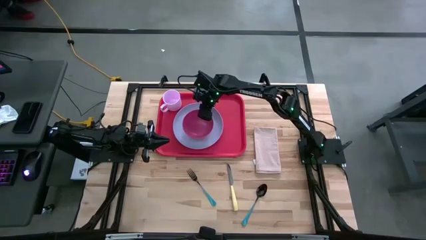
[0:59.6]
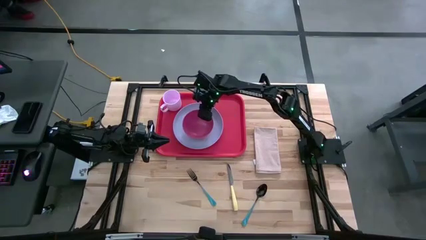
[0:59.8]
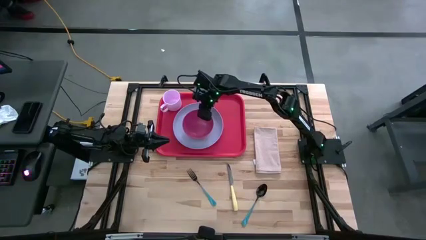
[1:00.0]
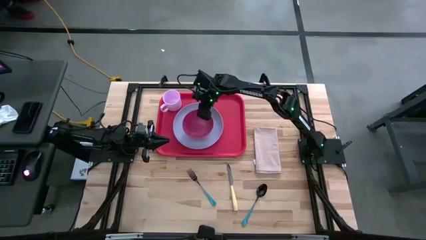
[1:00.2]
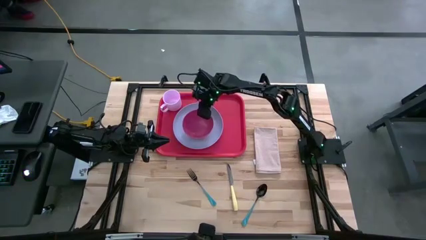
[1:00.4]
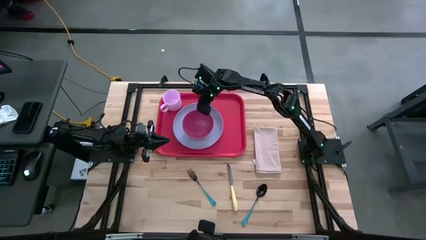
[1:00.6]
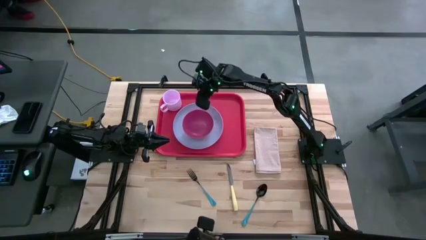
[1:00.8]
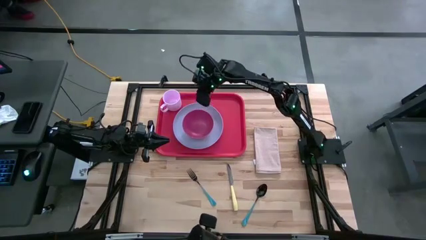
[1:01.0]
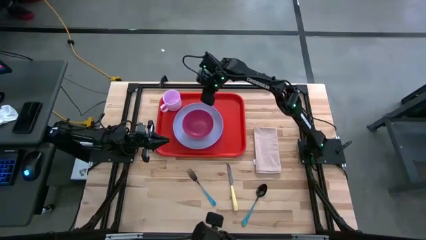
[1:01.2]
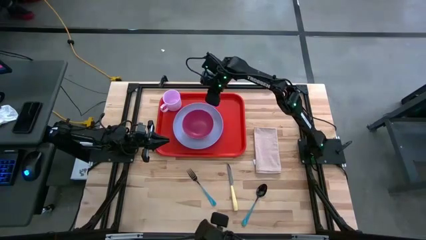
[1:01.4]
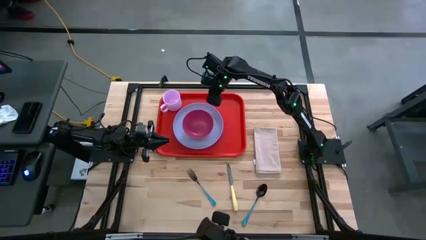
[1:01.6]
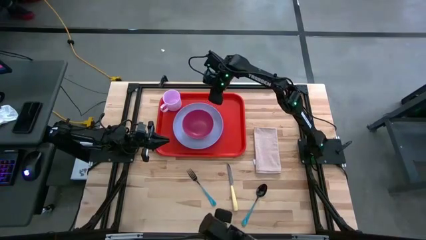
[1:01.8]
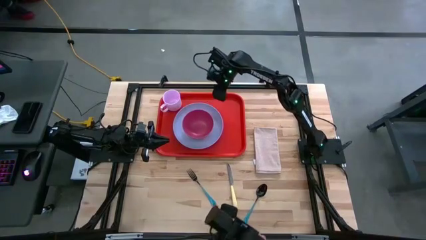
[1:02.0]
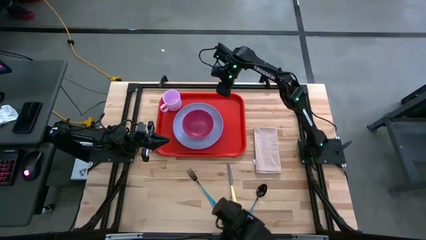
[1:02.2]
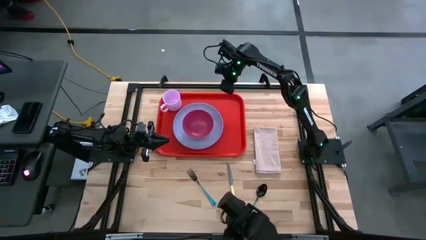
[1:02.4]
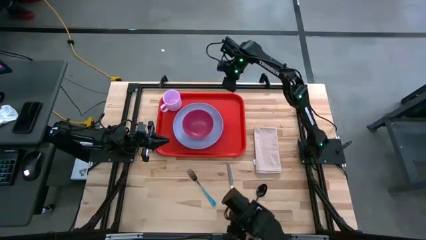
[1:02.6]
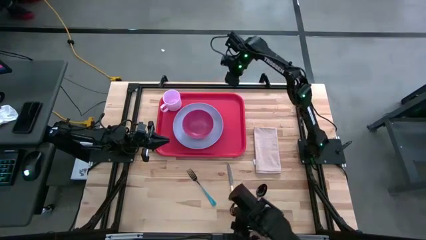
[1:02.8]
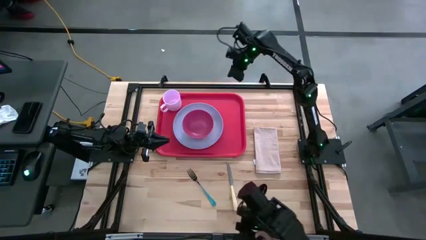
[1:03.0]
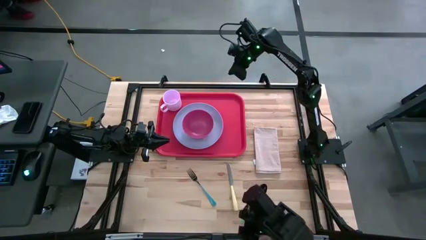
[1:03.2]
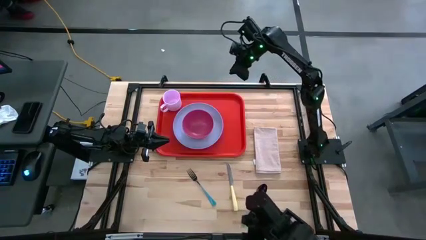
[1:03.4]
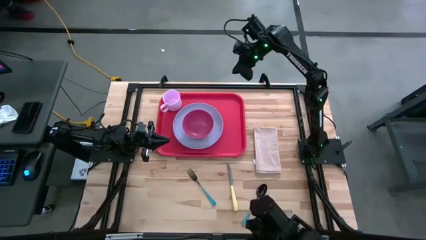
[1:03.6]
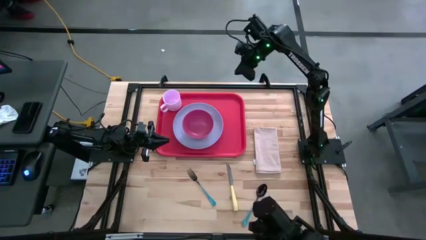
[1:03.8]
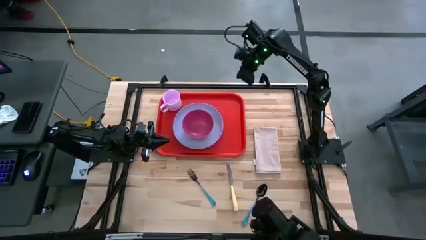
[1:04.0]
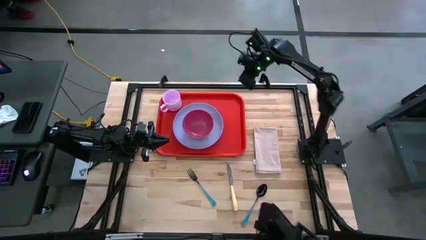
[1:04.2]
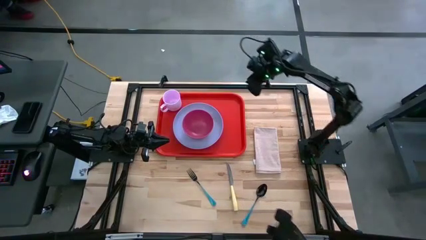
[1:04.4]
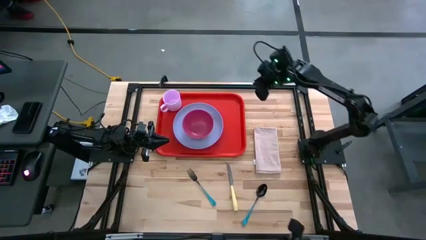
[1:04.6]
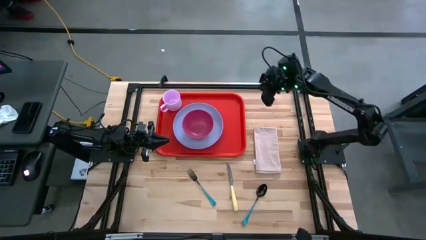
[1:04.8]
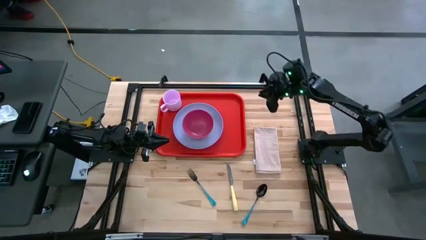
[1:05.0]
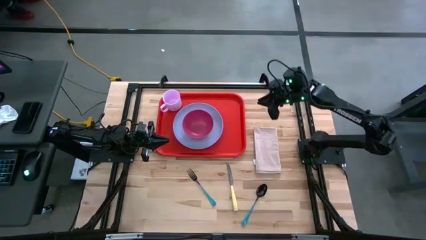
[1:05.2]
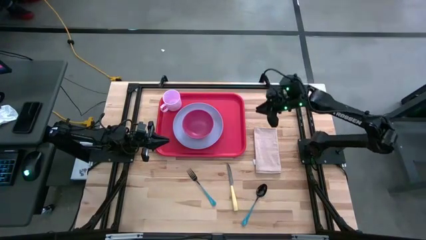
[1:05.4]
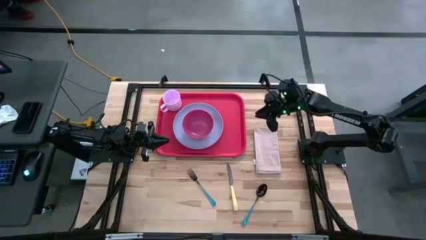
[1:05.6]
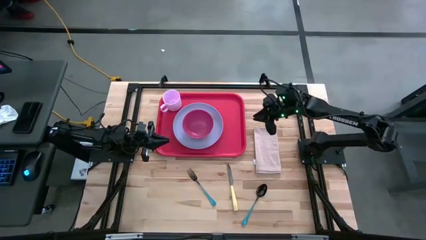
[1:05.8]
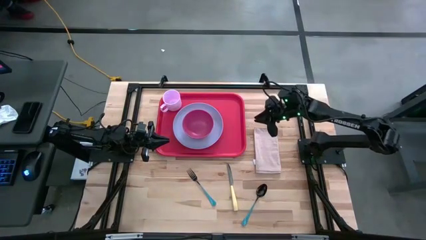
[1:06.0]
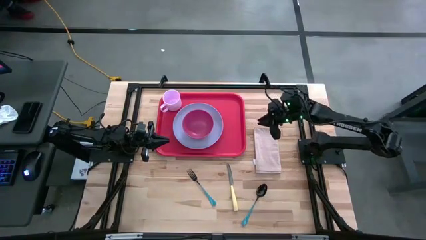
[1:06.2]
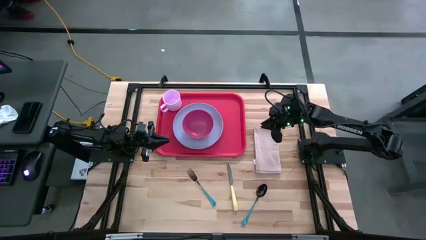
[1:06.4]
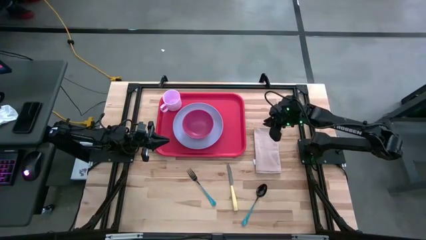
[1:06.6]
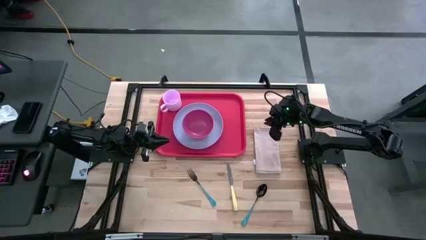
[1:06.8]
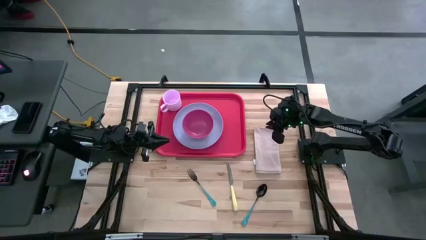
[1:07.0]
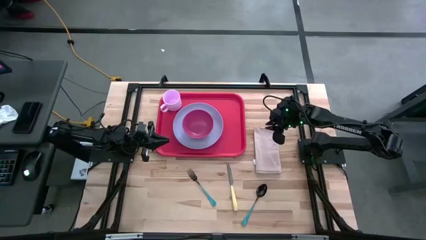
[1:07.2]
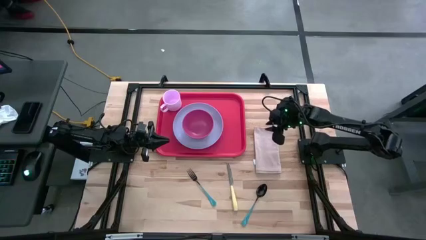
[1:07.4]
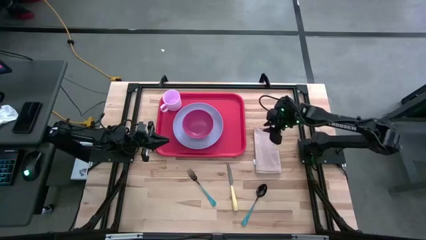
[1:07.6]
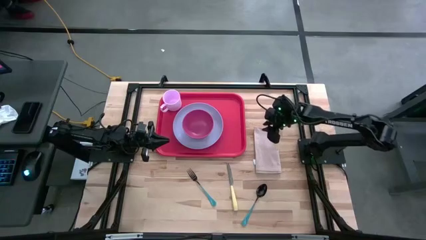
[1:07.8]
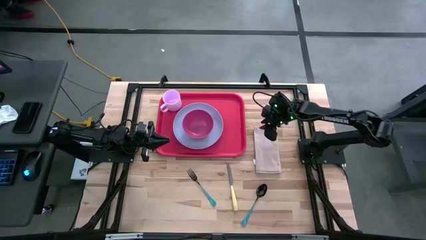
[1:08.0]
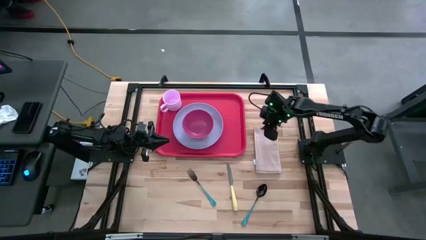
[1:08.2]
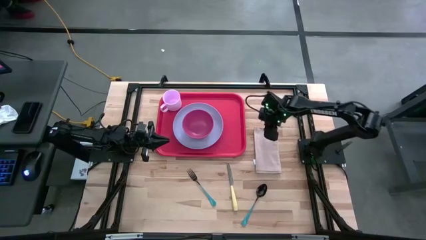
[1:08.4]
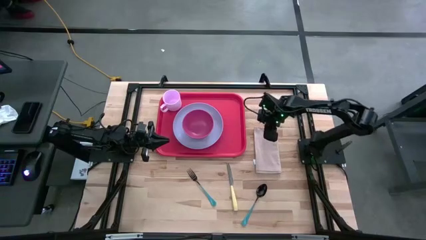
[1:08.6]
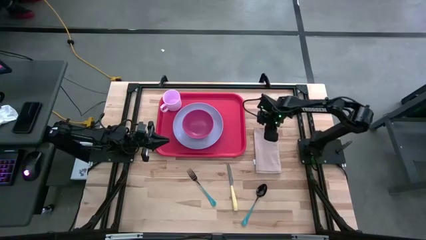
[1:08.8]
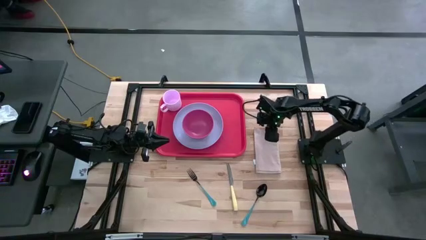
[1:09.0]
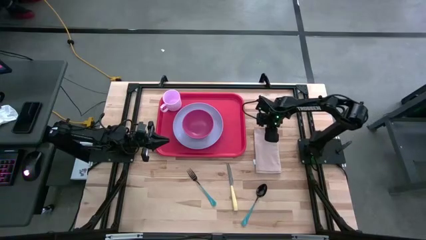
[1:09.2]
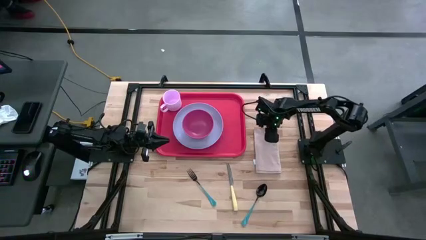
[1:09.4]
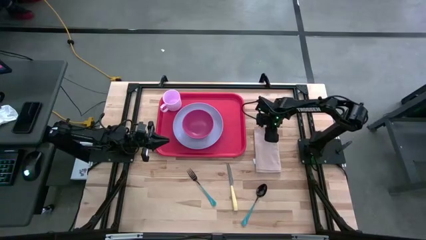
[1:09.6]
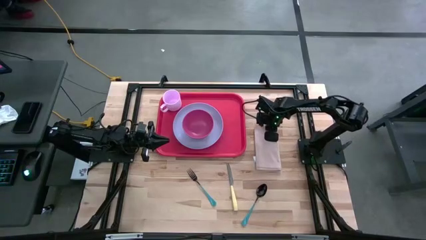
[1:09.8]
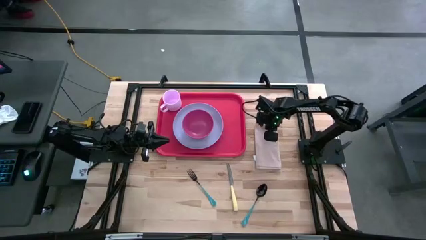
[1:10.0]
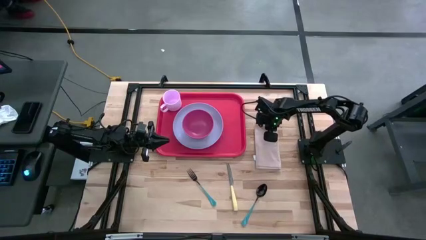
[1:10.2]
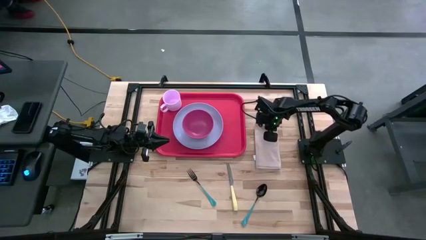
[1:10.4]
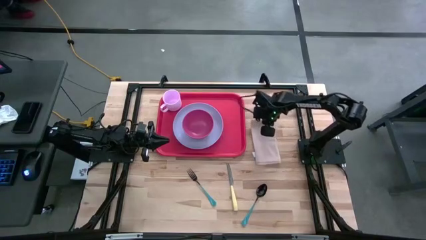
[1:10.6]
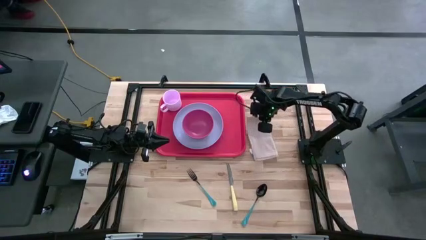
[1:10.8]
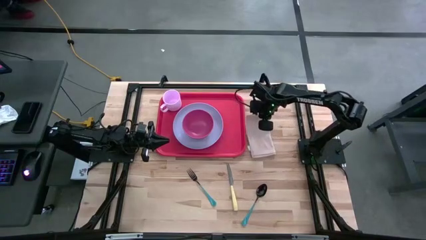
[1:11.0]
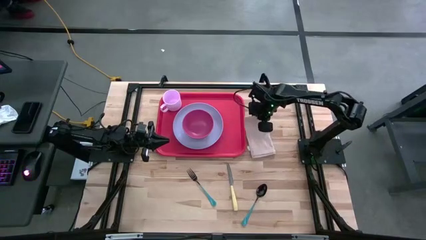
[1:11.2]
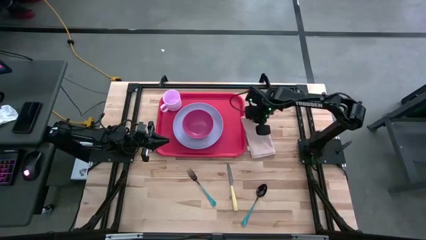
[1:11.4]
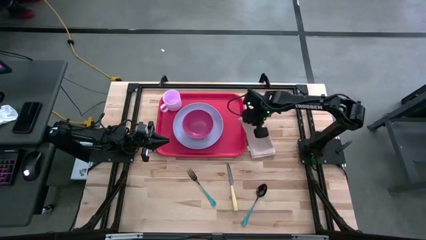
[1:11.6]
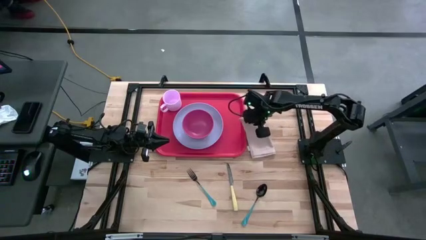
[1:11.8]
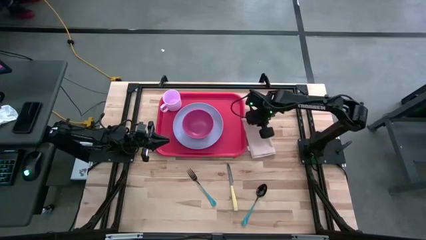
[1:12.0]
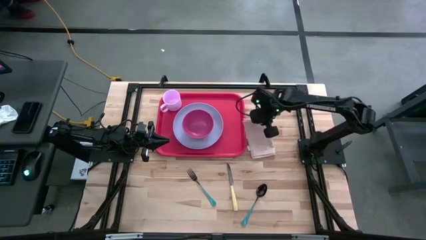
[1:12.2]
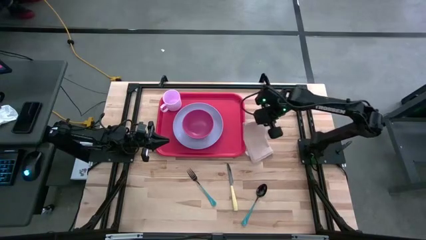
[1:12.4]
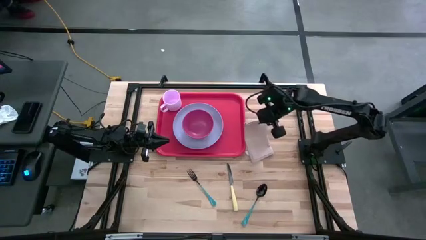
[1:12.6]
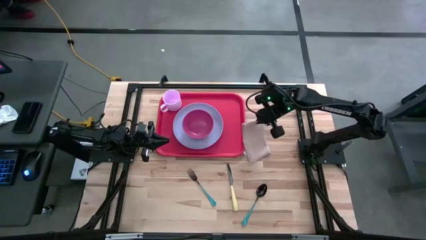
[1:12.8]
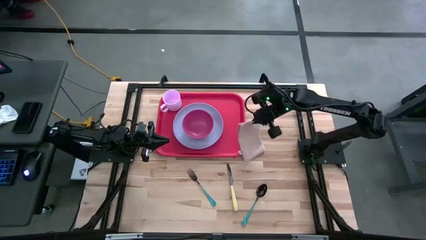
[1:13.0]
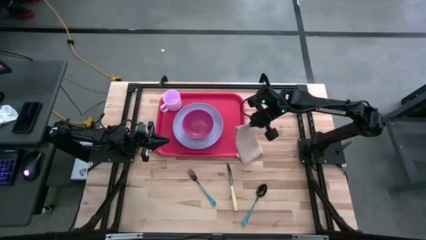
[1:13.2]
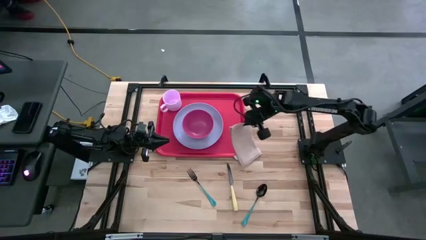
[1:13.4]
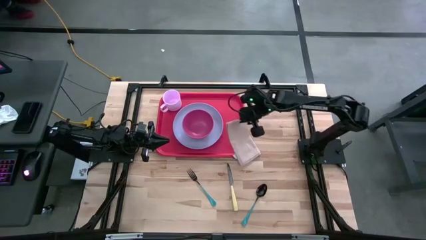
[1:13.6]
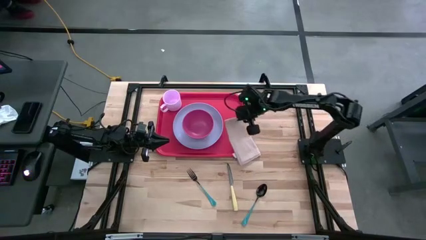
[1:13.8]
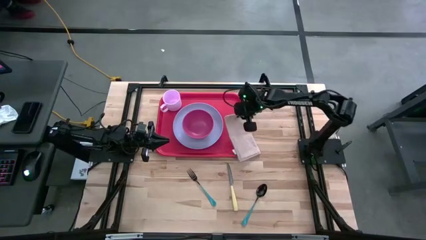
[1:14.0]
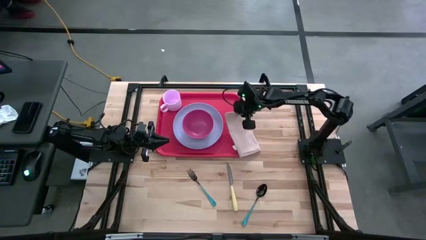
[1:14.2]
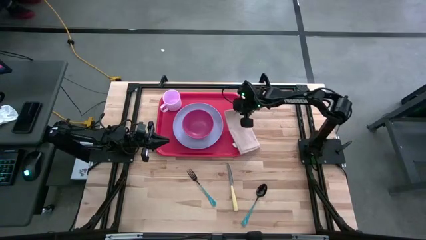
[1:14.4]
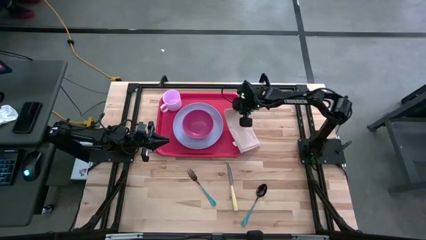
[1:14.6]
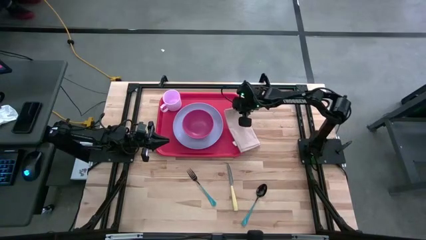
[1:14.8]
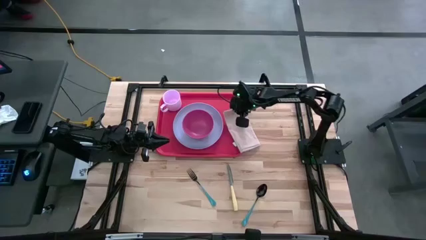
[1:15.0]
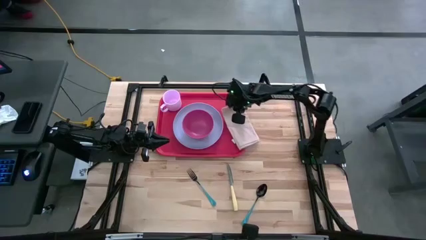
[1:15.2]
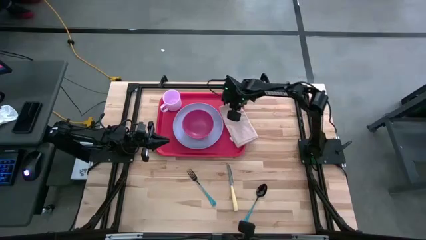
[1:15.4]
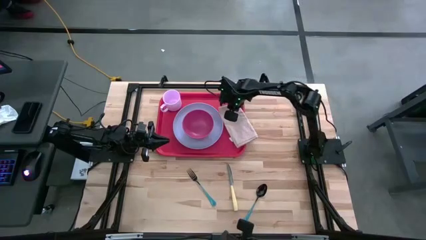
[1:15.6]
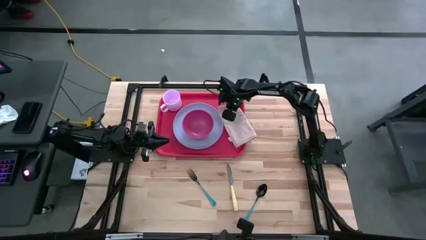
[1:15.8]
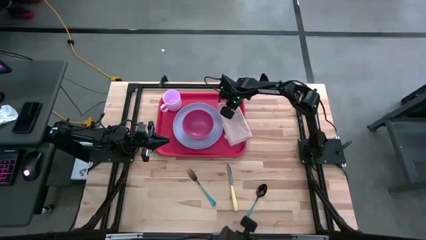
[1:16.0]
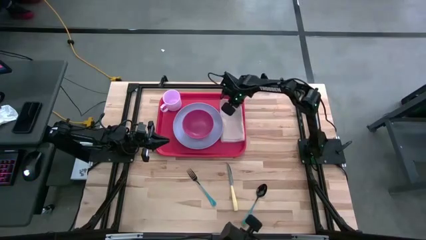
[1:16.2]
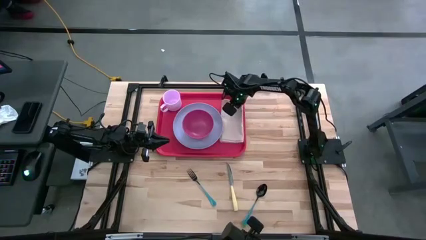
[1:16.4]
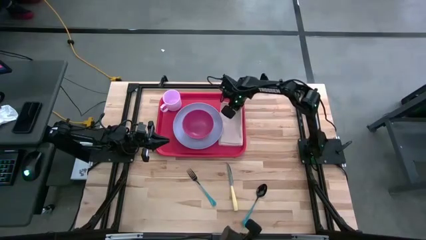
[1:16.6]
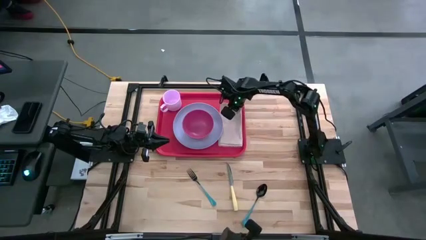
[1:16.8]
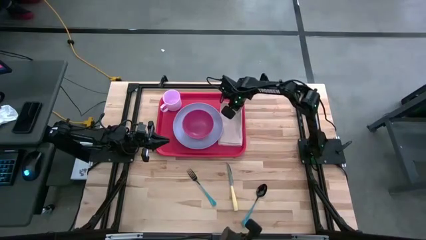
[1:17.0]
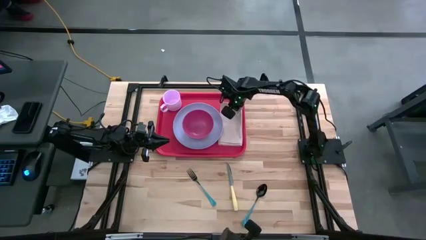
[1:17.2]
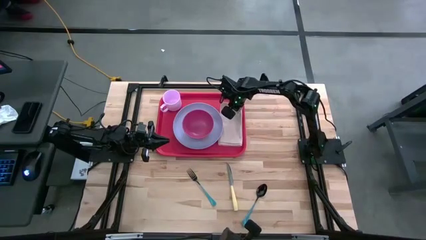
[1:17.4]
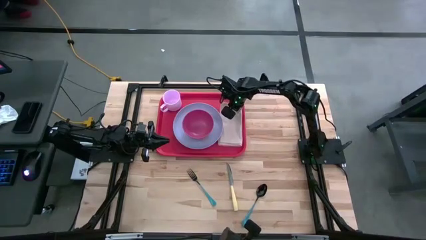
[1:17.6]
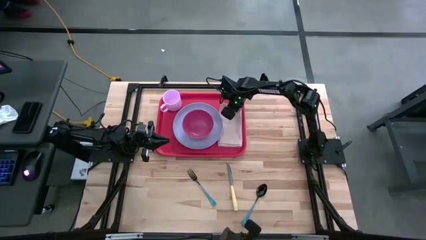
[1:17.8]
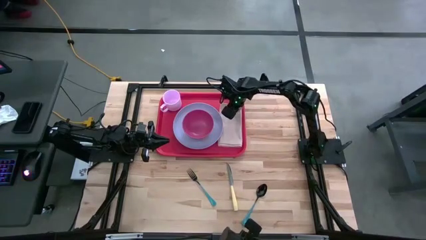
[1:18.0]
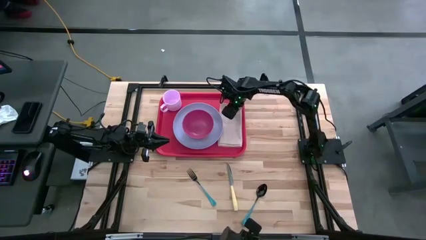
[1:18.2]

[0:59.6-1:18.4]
Task: Set up tray
Put the white table napkin on the red serving tray to the right of the purple plate
